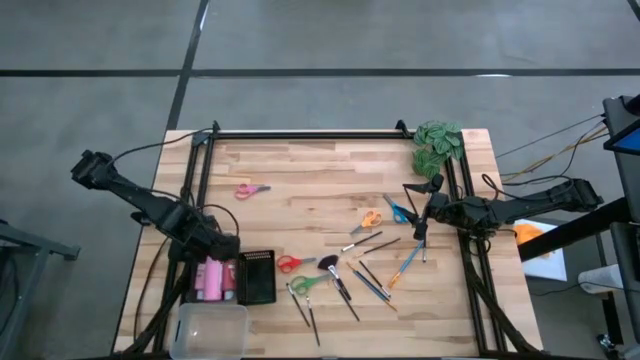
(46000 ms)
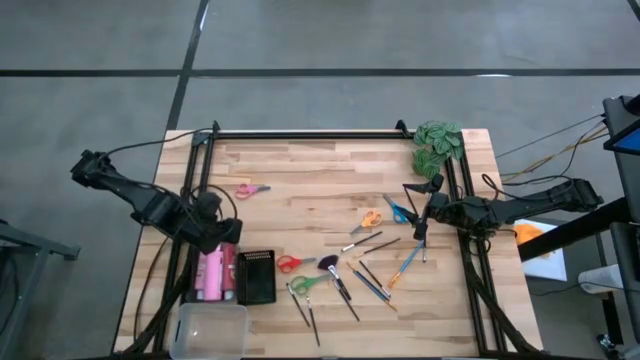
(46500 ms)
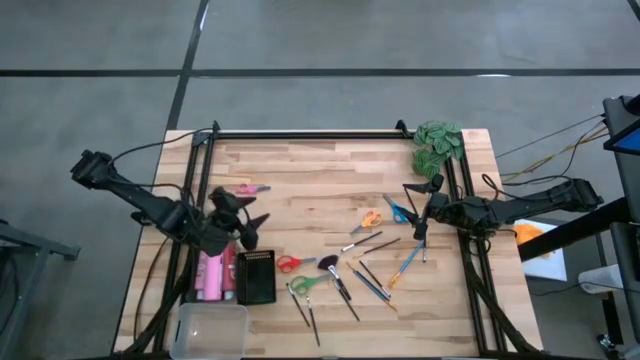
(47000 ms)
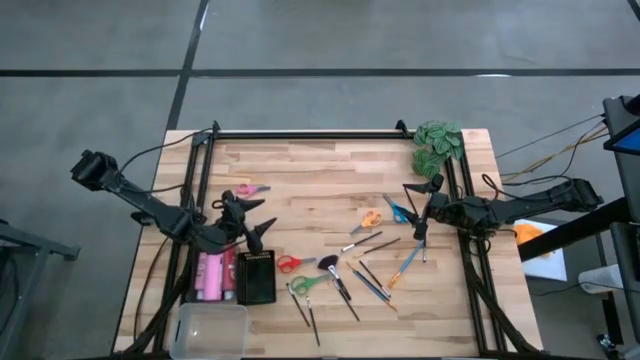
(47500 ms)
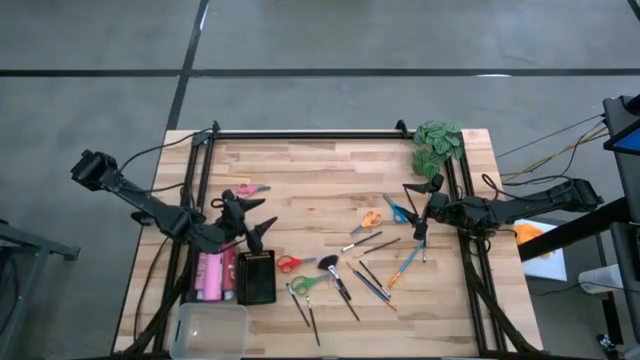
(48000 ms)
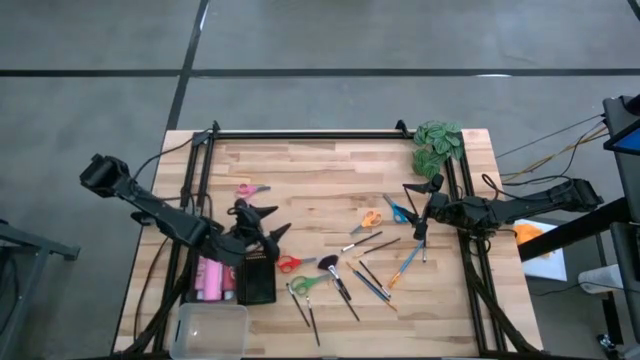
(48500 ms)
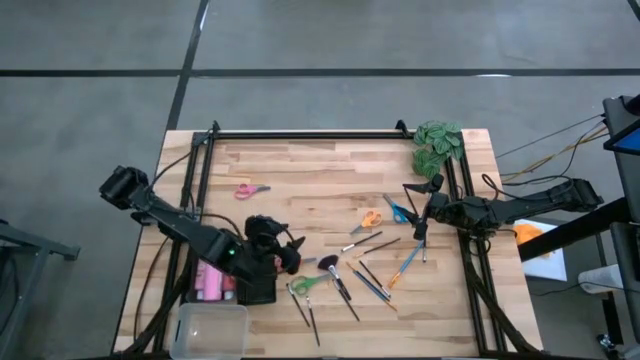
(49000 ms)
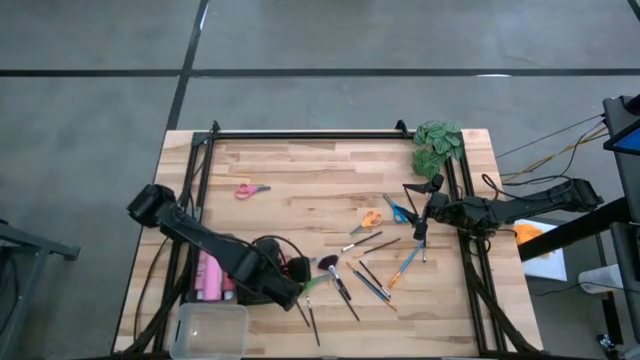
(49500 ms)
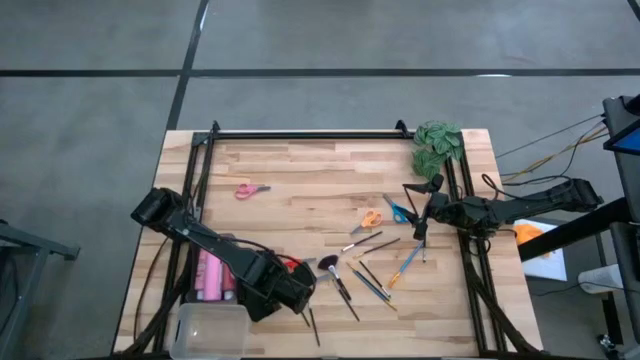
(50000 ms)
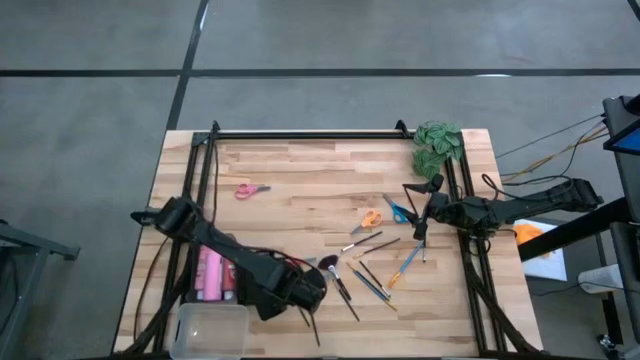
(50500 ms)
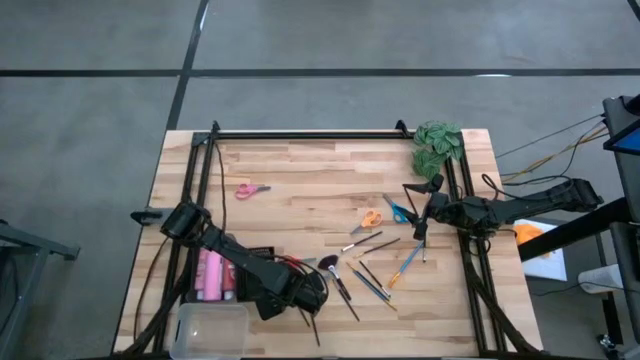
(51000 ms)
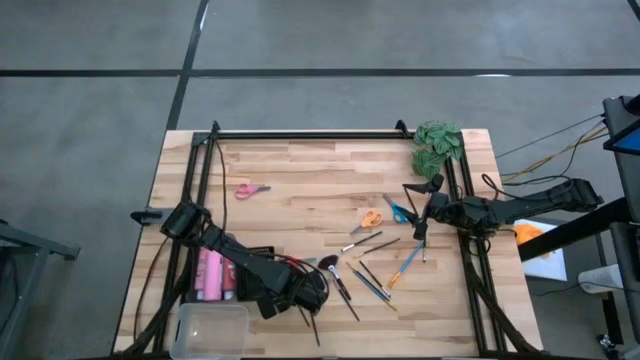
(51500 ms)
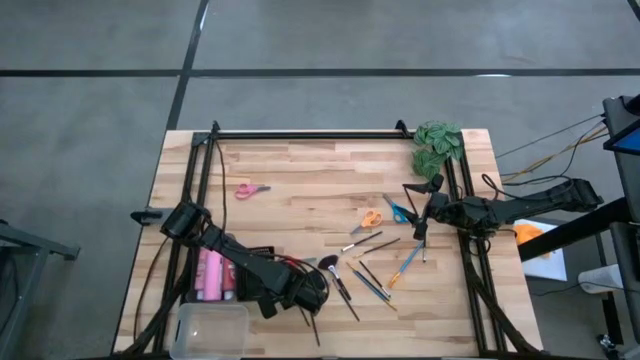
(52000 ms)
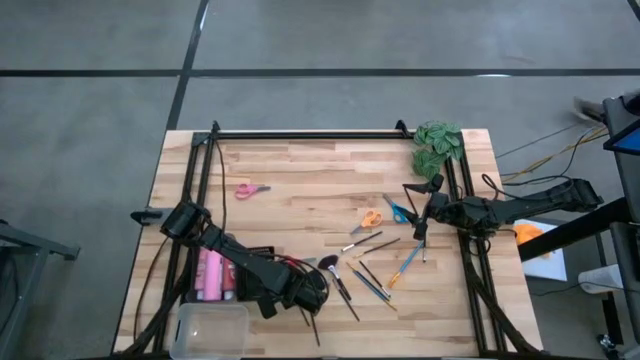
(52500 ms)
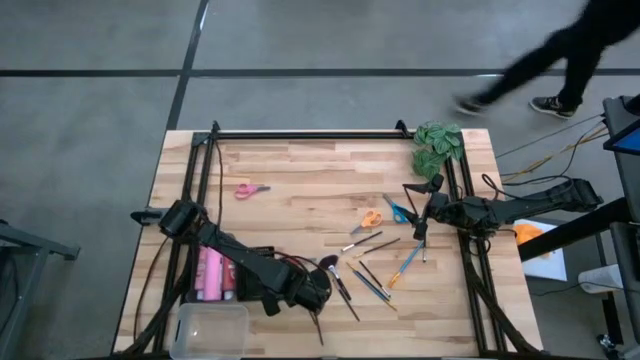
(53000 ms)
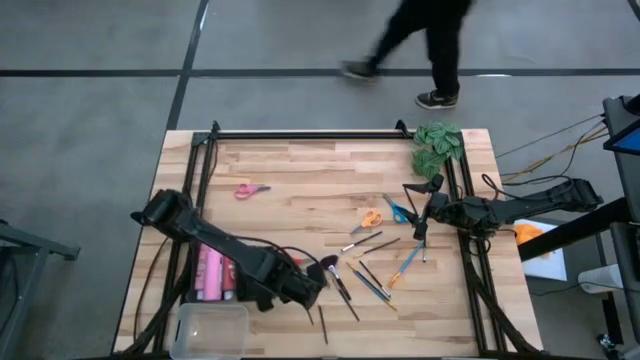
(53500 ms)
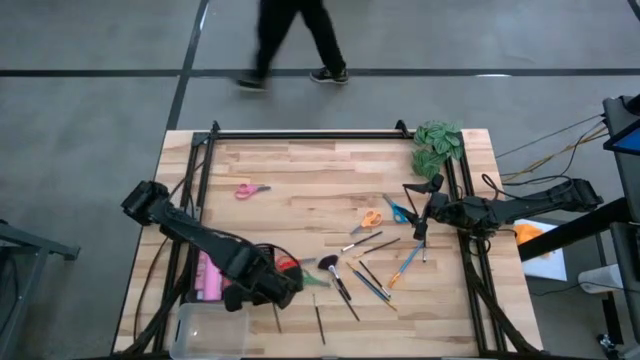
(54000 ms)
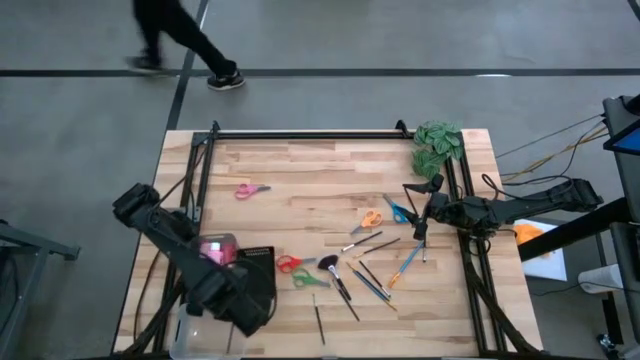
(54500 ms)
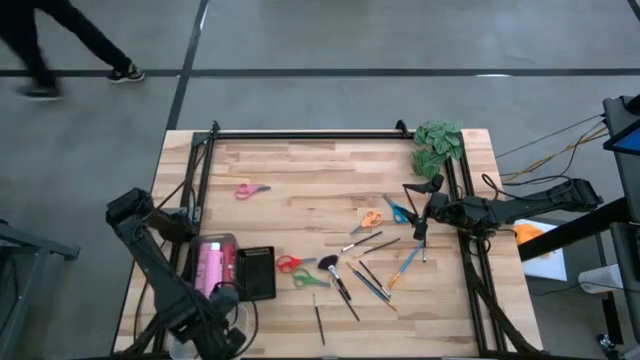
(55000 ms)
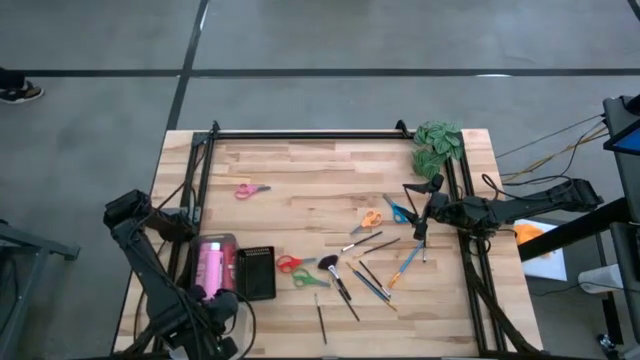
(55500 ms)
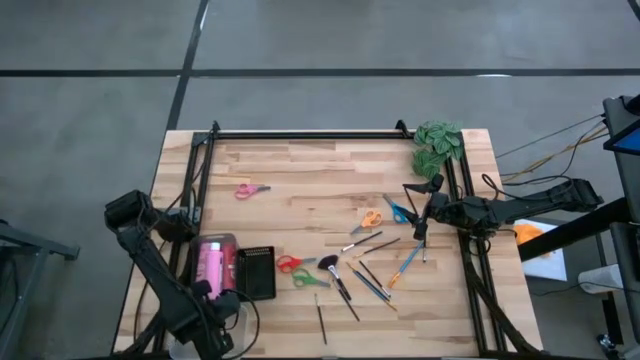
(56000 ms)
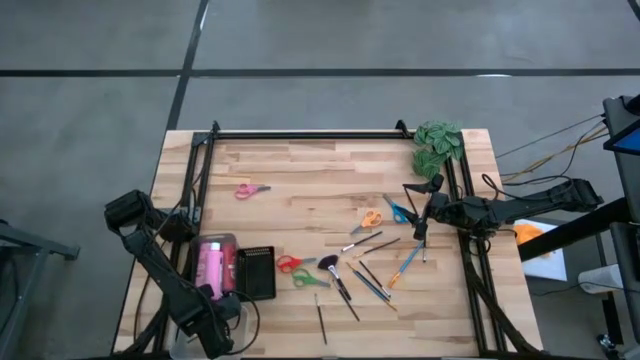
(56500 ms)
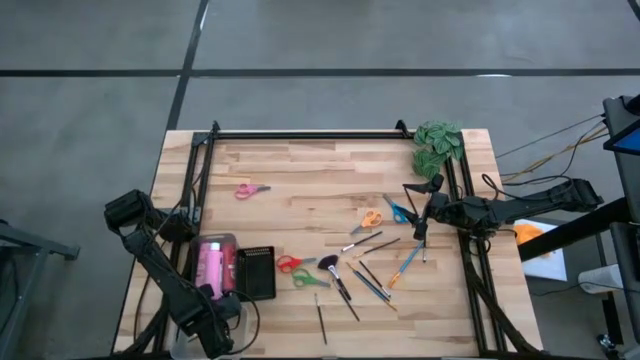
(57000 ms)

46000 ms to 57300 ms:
Task: Pick & Place Paint Supplies
Put the silver paint brush into the transparent bin

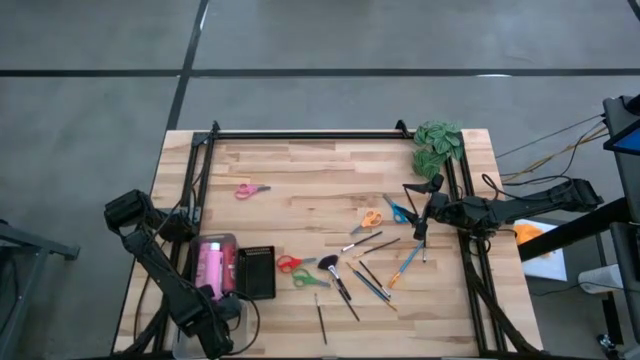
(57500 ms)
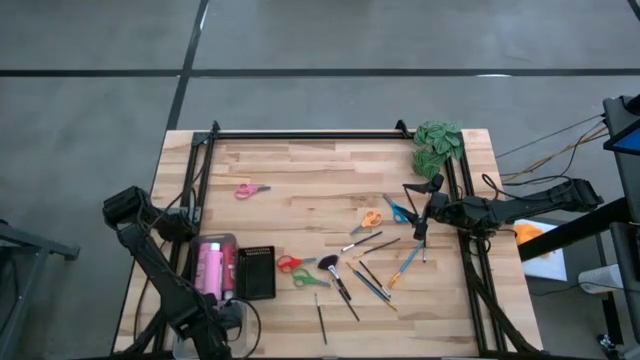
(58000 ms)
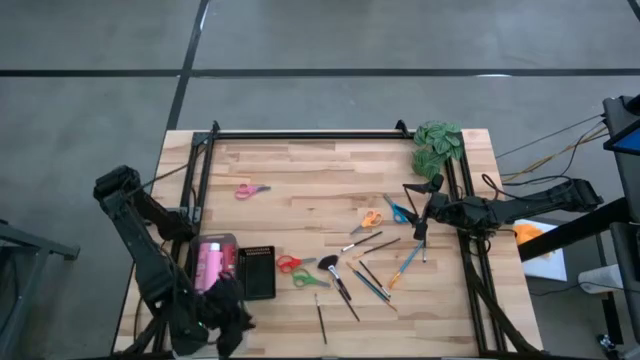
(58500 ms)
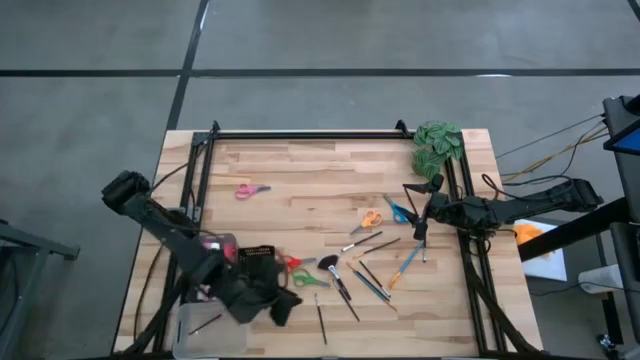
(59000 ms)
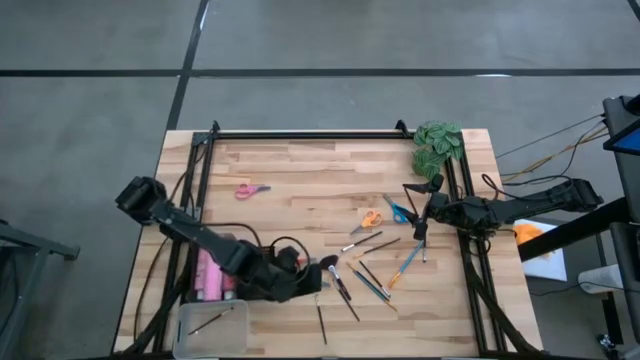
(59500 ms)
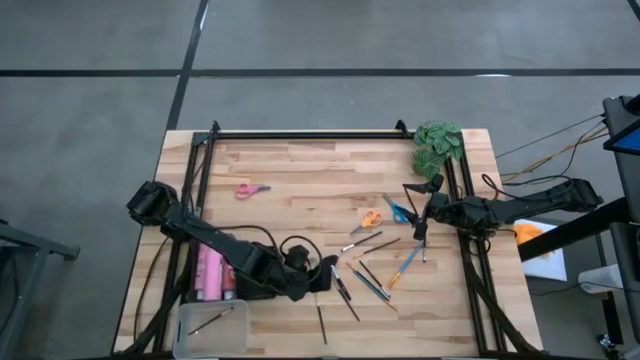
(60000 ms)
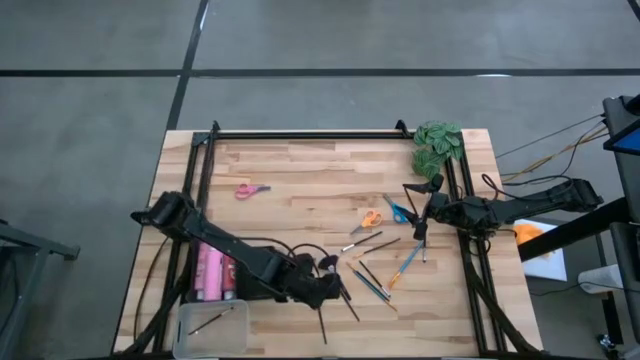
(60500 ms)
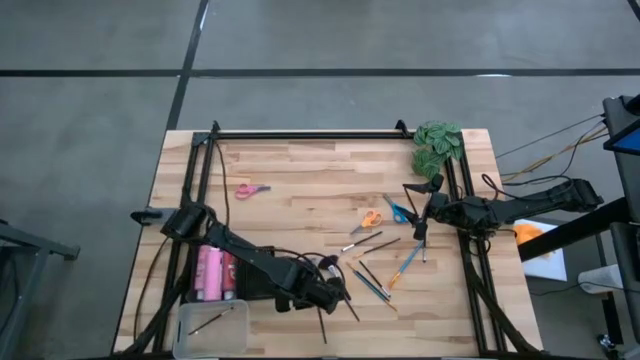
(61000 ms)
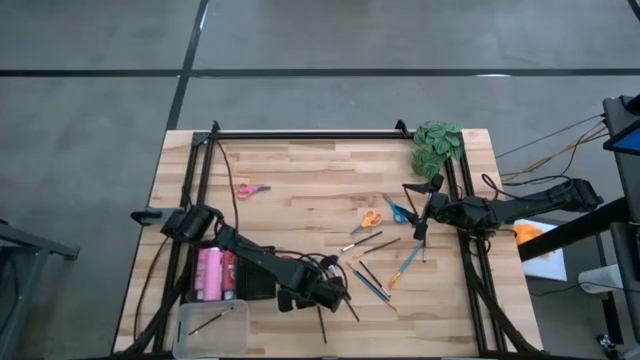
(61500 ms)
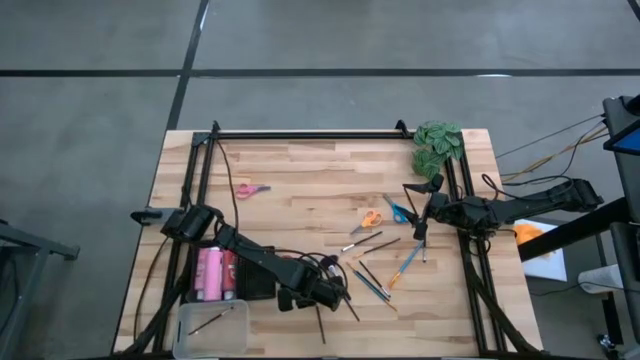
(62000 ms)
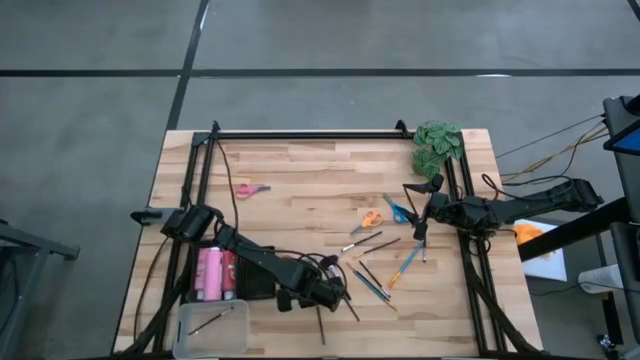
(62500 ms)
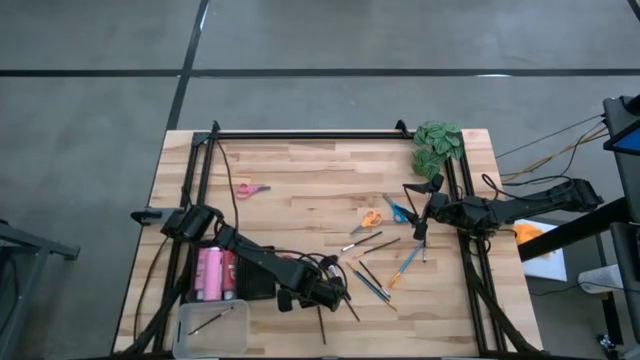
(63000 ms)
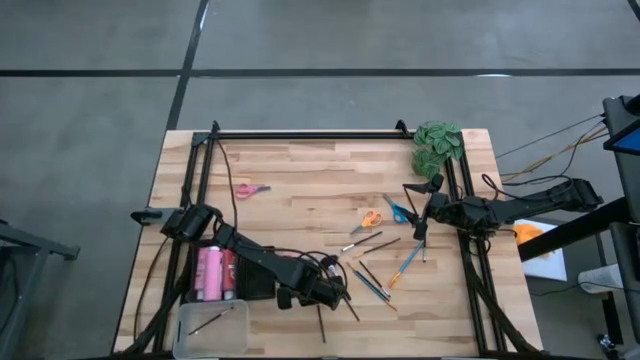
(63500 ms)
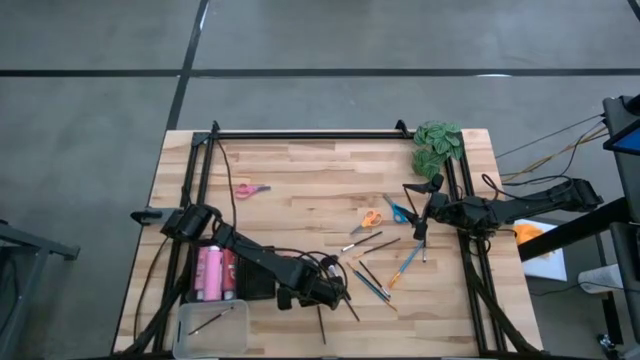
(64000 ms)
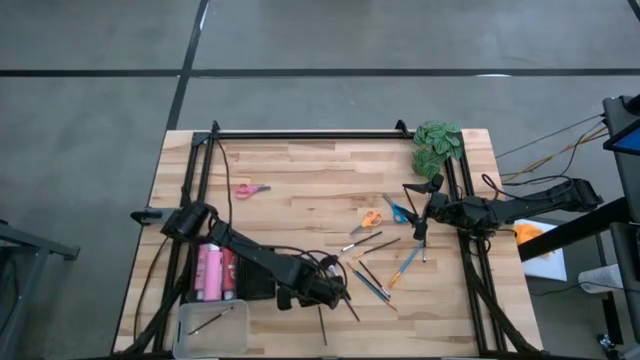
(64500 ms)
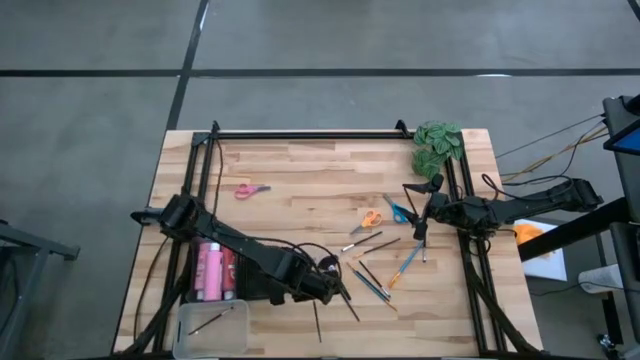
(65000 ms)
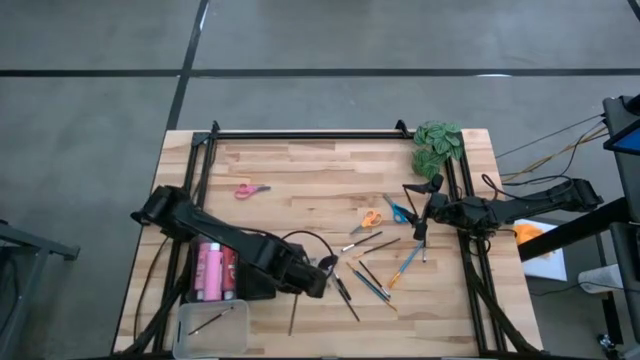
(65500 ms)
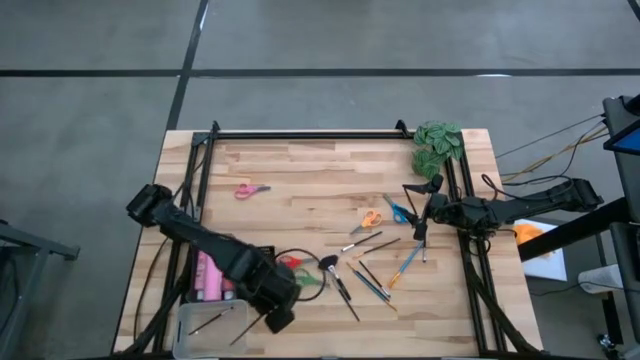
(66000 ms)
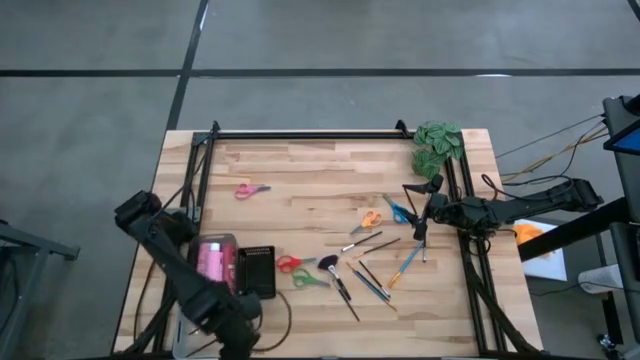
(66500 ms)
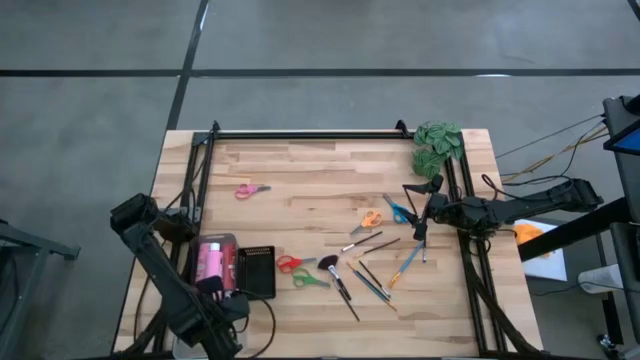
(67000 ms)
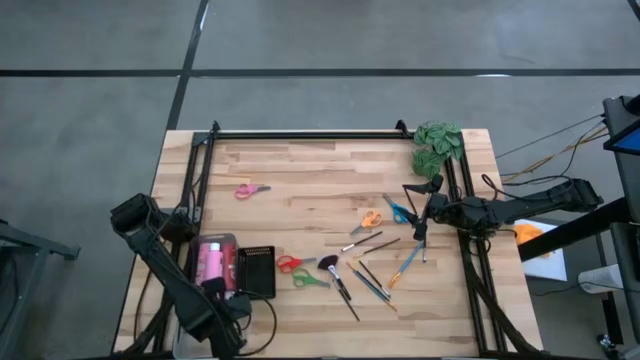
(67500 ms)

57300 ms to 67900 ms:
Put the silver paint brush into the transparent bin

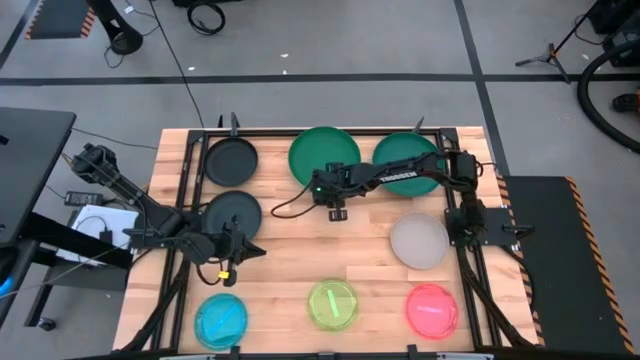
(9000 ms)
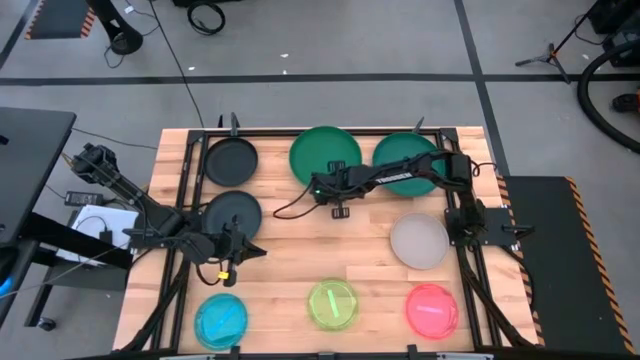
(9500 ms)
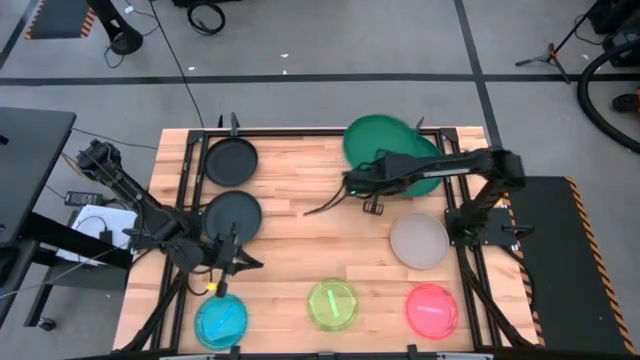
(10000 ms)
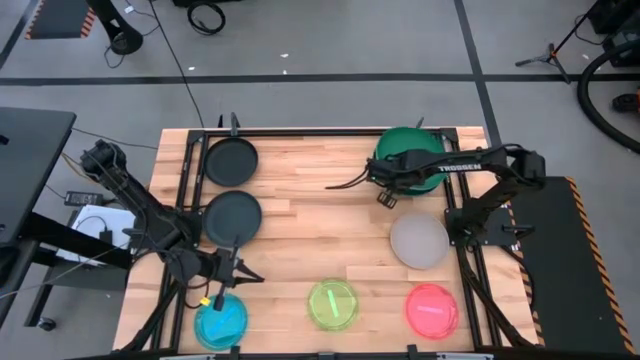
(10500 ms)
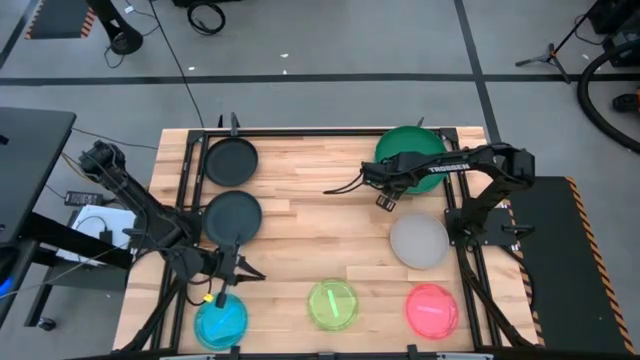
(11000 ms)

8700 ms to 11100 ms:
Task: Stack plastic plates
Stack the stacked plates on top of the dark green plate
